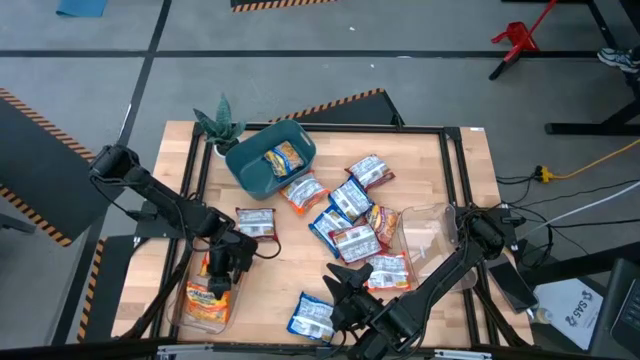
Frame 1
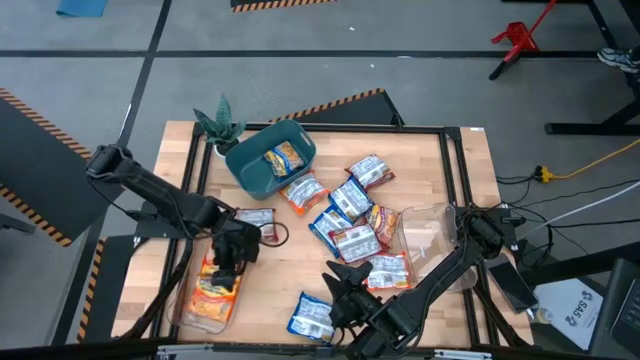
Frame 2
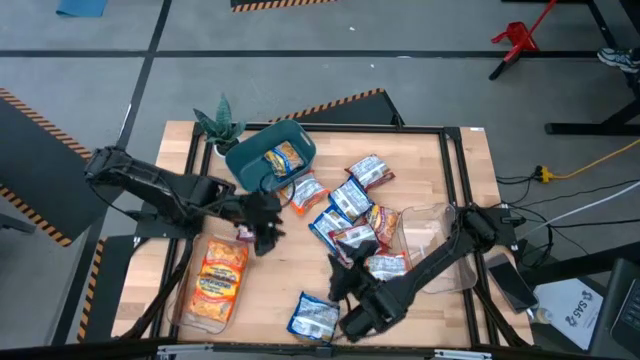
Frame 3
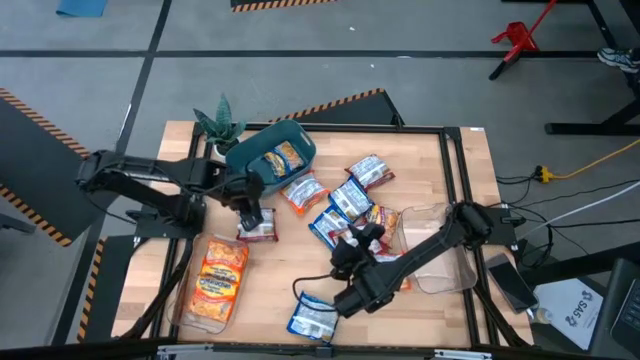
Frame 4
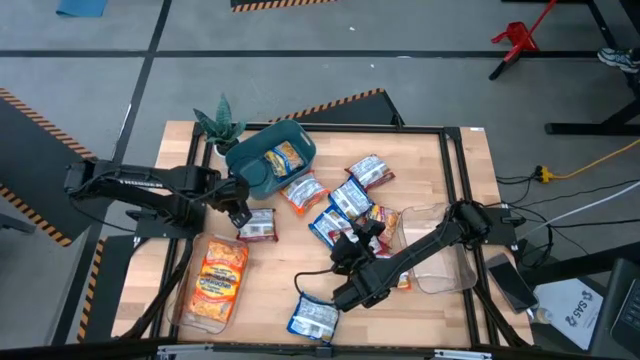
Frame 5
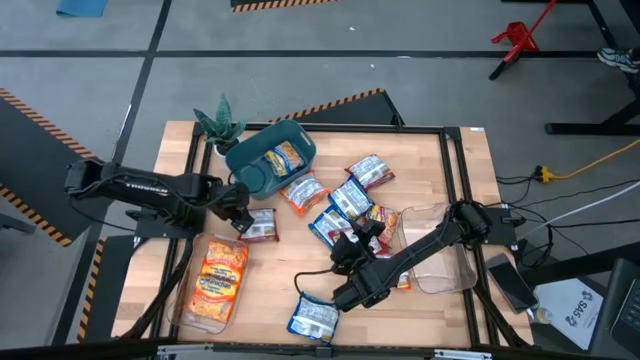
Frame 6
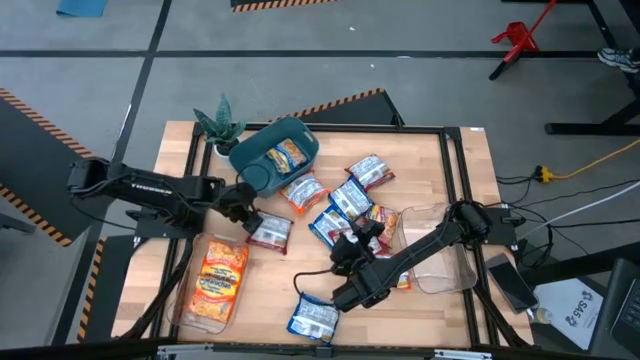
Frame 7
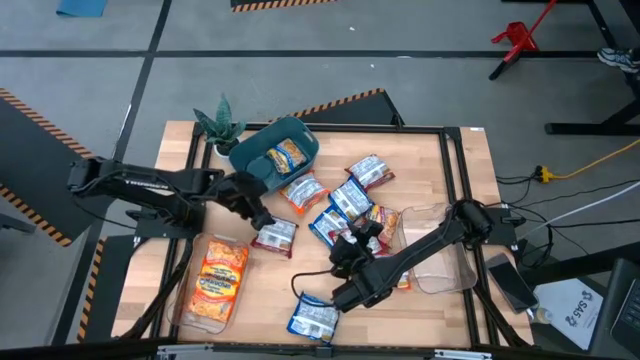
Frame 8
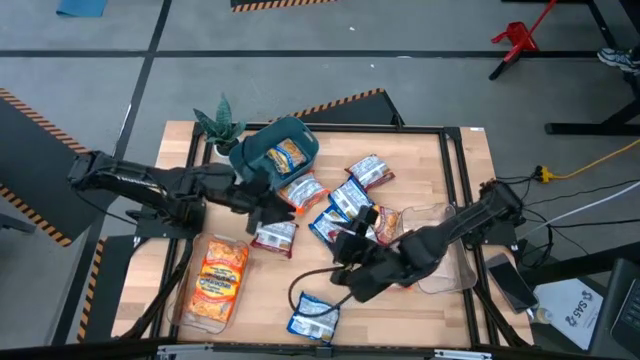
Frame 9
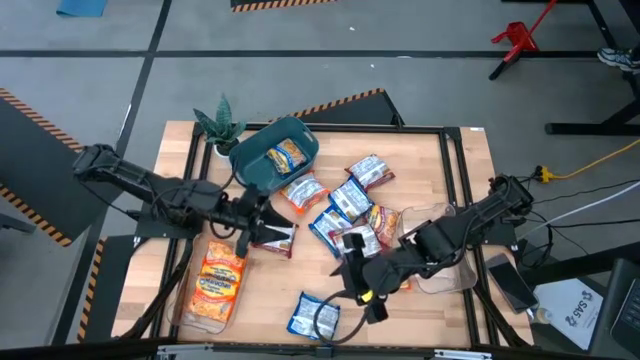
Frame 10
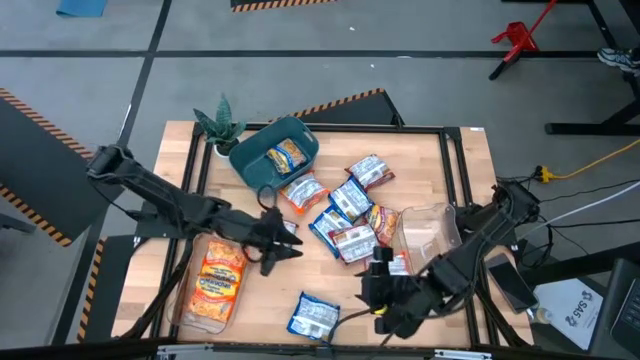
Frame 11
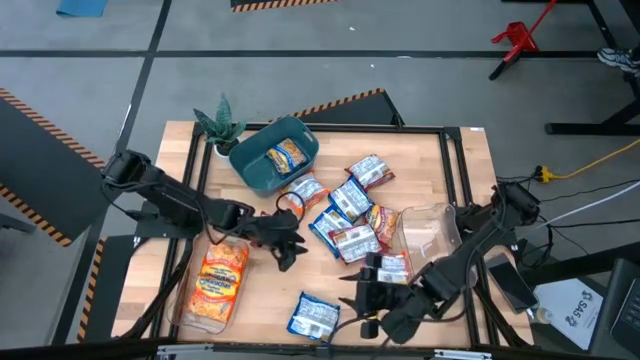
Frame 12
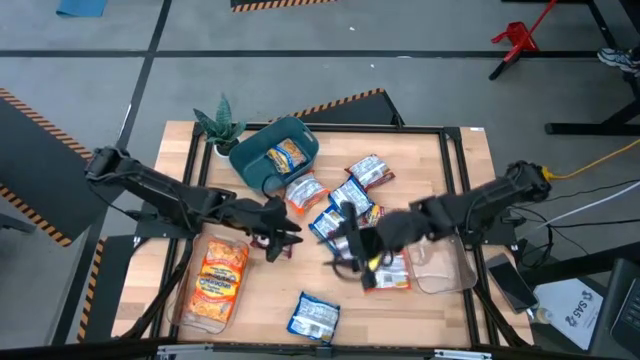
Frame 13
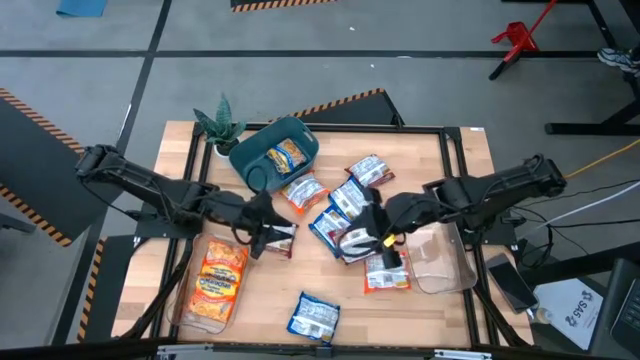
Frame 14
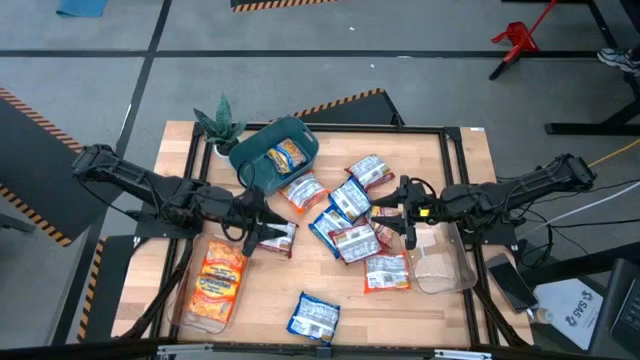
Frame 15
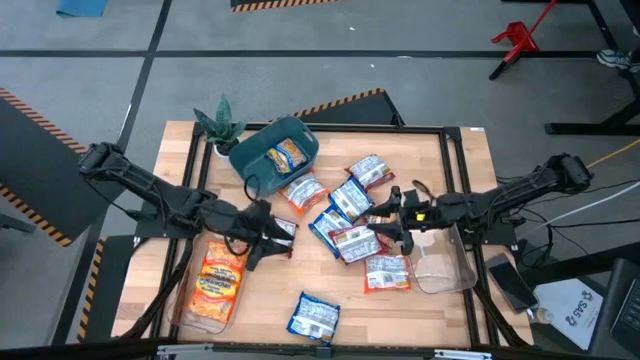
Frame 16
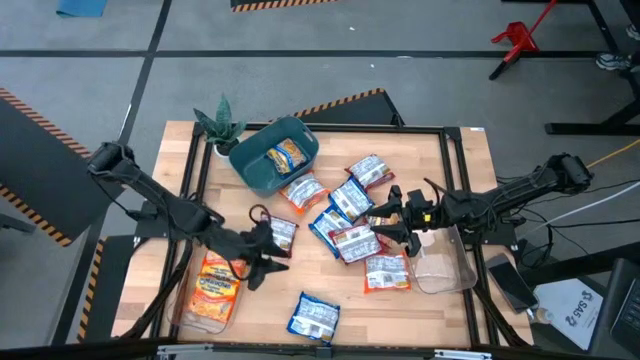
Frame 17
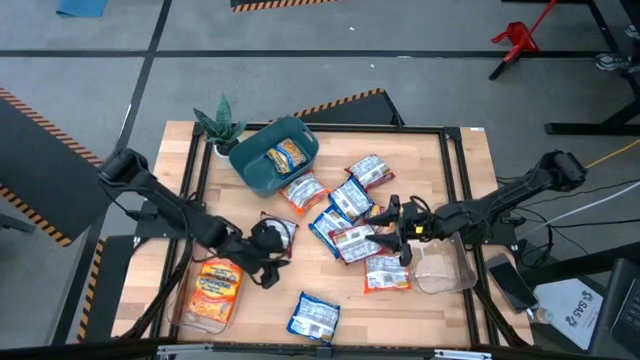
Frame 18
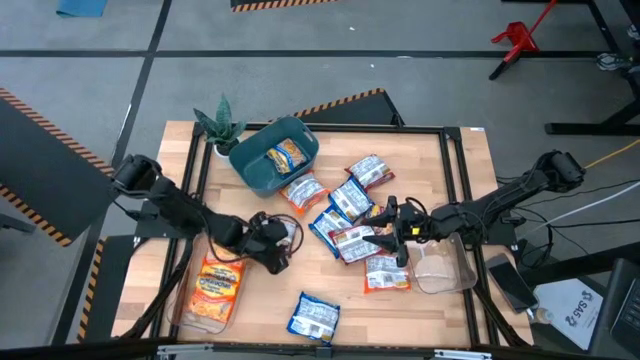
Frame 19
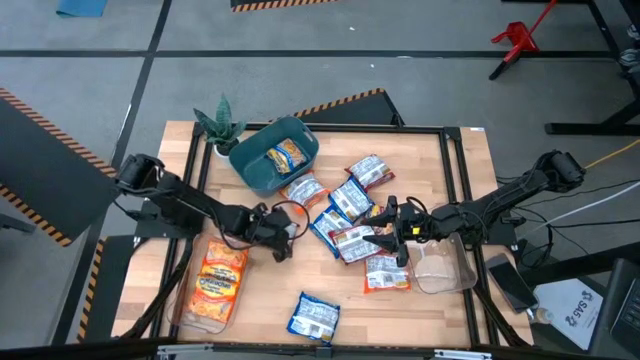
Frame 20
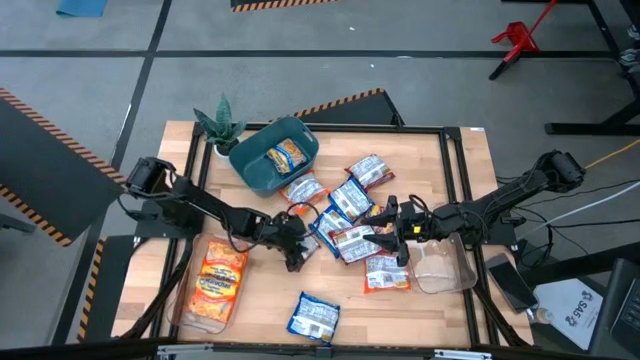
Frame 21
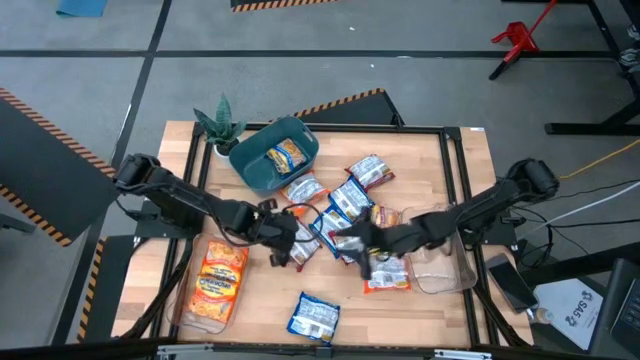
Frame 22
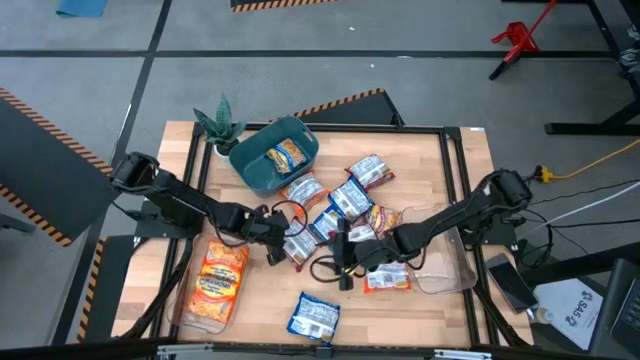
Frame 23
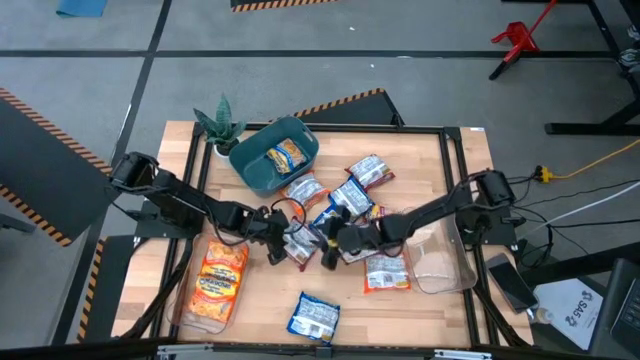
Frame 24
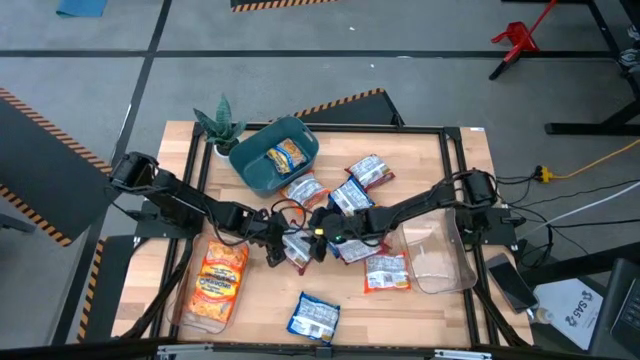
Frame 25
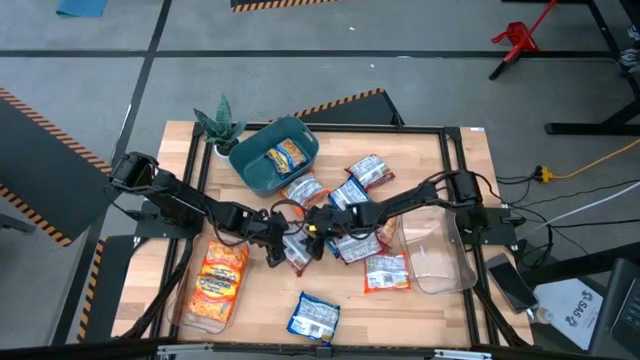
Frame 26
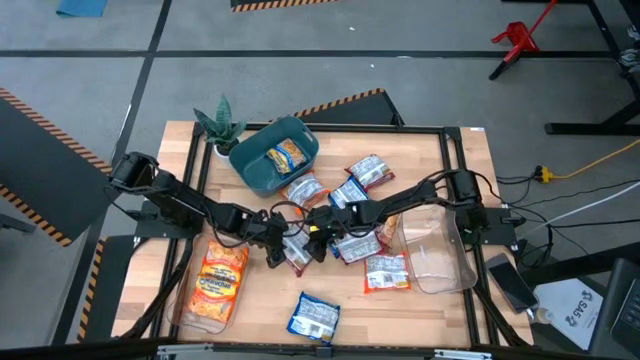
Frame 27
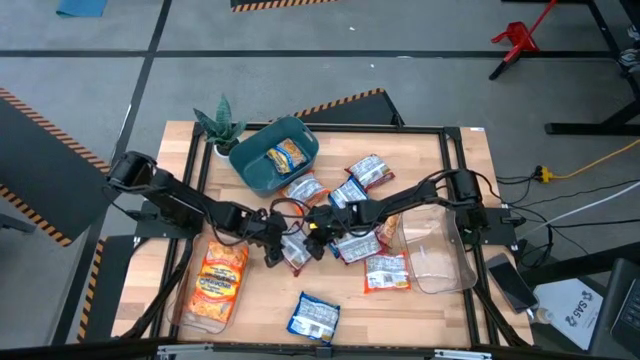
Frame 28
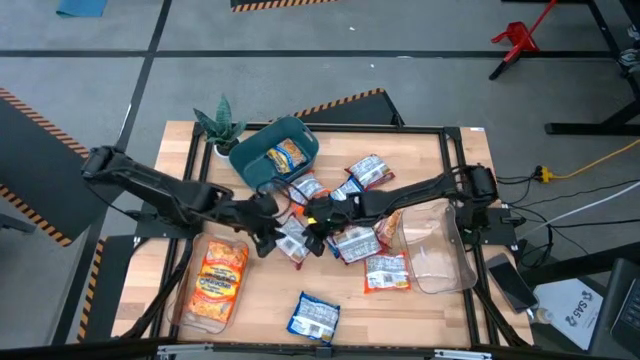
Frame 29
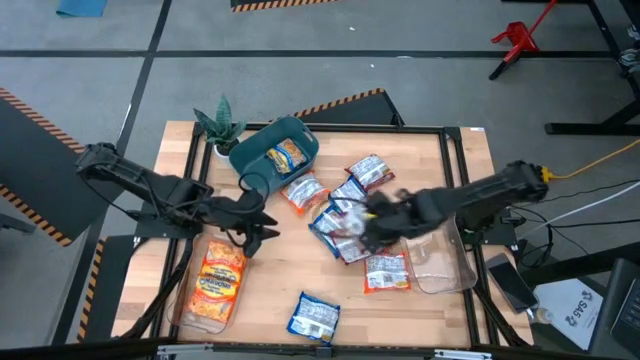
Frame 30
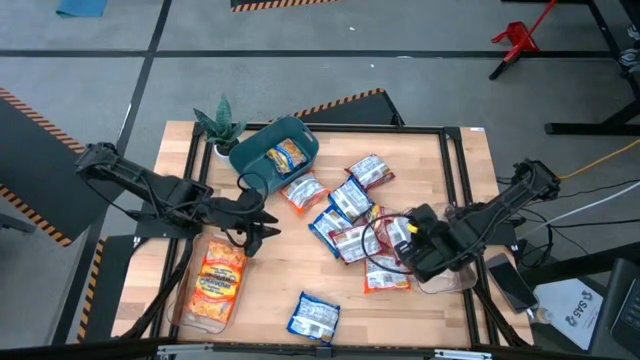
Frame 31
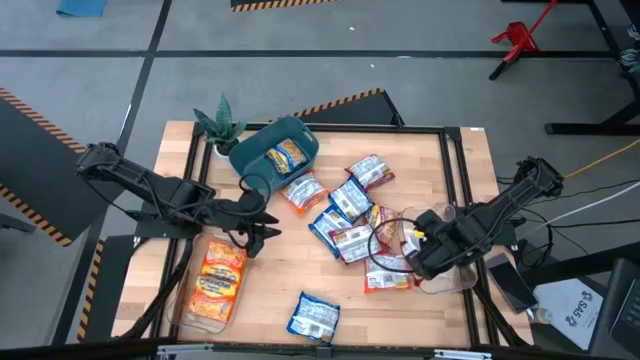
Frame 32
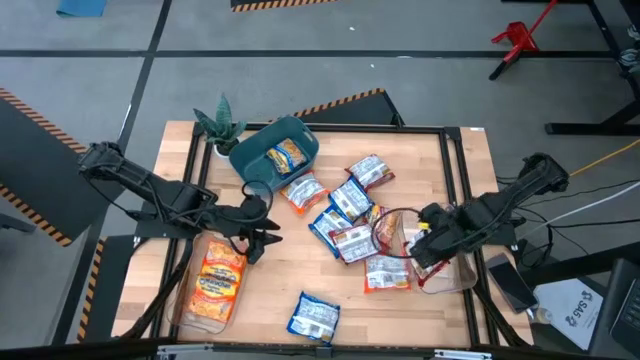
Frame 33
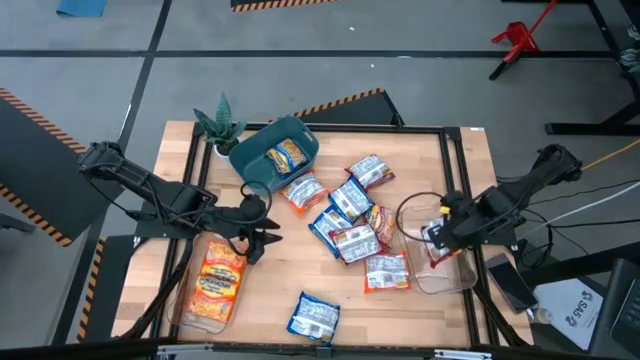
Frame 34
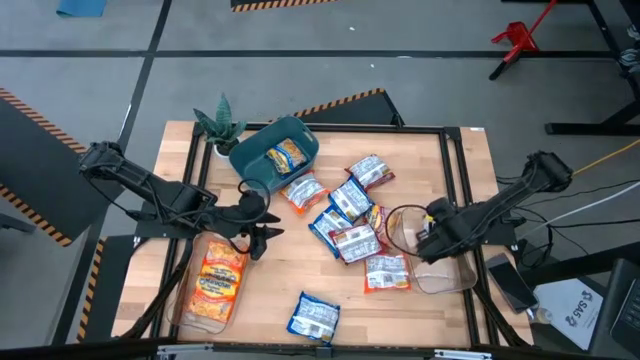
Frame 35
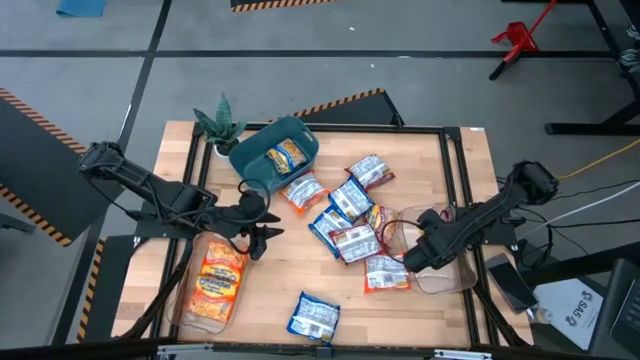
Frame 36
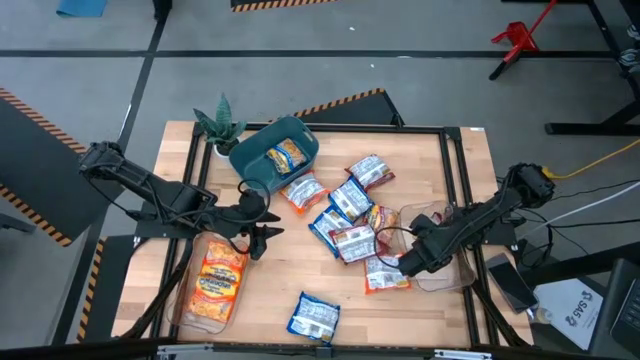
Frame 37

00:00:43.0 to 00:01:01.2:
Task: Sort Maruchan noodles
Put the red noodle pack into the right transparent bin

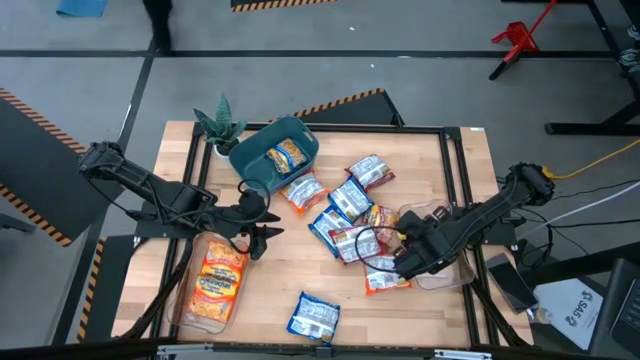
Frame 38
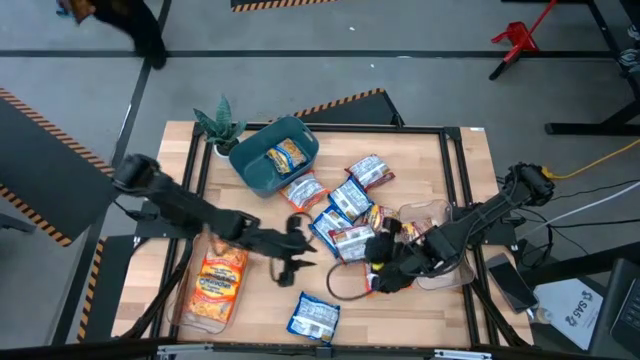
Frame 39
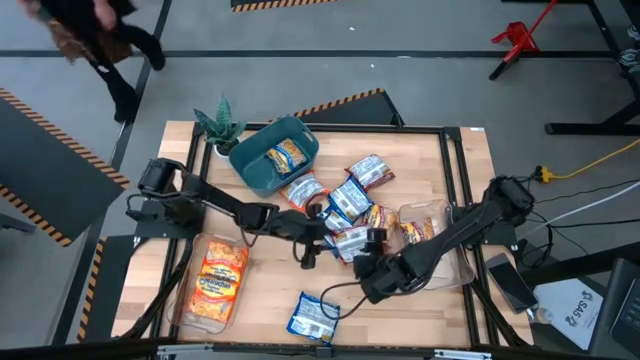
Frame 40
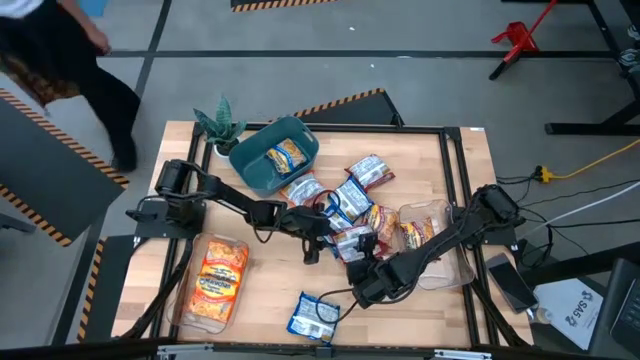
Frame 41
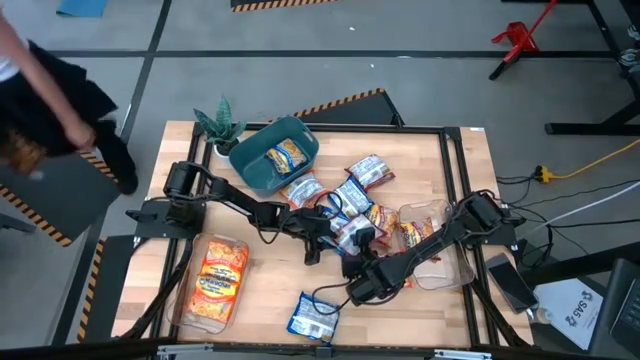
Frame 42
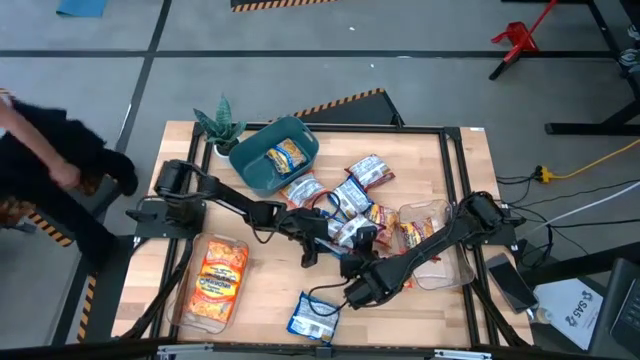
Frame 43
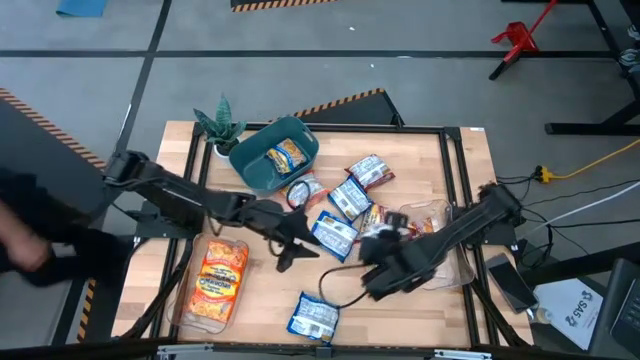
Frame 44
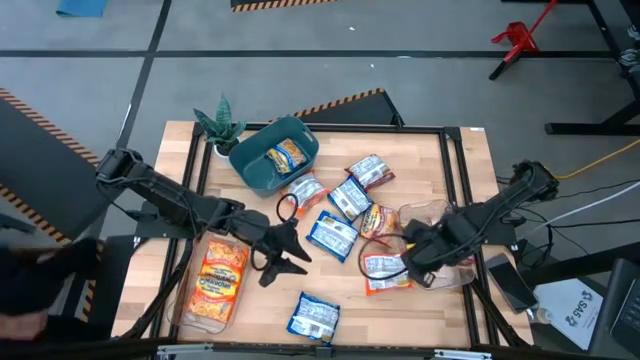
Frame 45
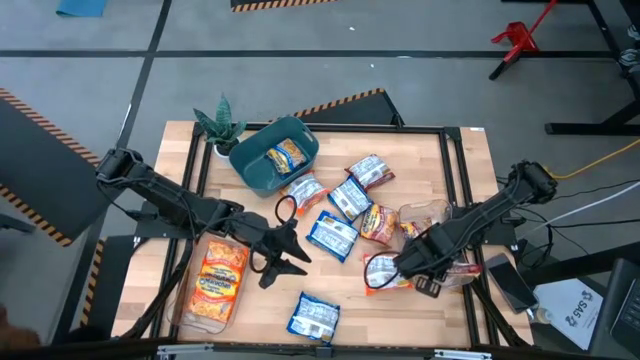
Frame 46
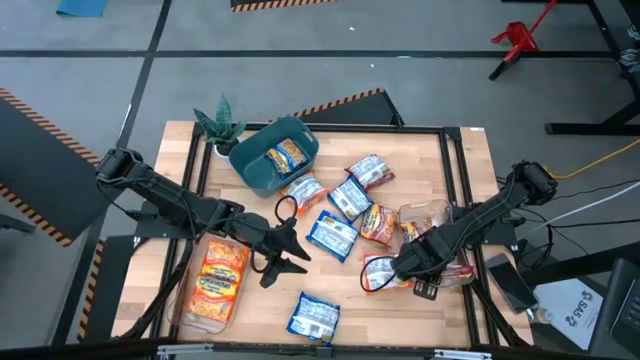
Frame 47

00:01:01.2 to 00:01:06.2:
Put the red noodle pack into the right transparent bin
